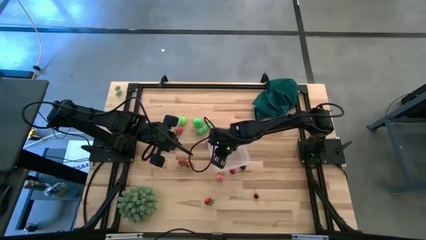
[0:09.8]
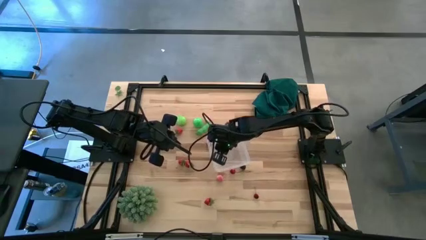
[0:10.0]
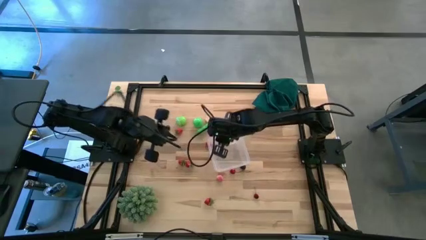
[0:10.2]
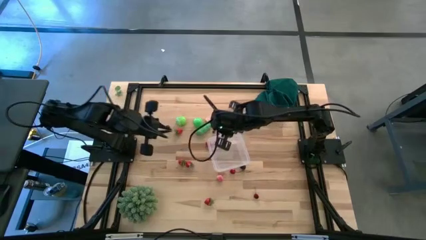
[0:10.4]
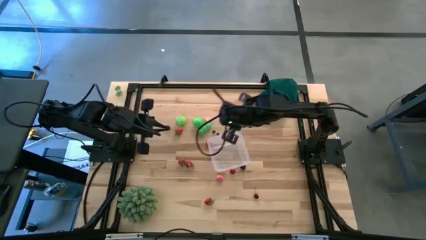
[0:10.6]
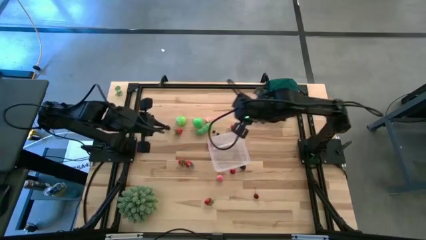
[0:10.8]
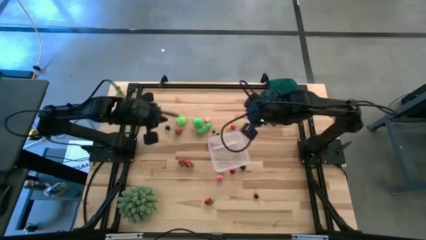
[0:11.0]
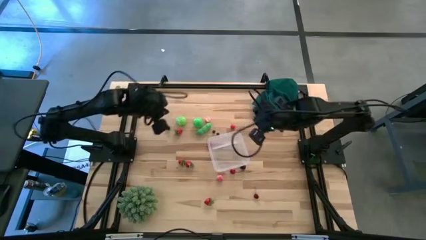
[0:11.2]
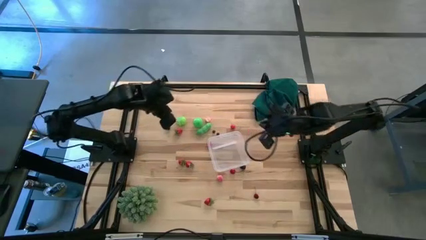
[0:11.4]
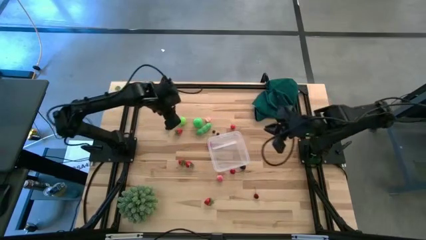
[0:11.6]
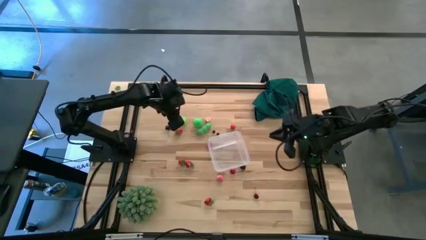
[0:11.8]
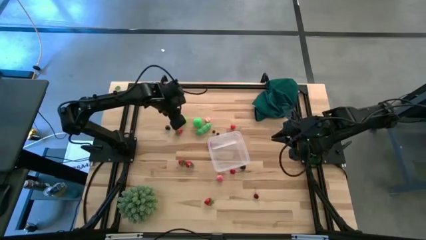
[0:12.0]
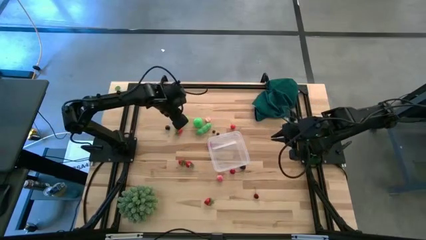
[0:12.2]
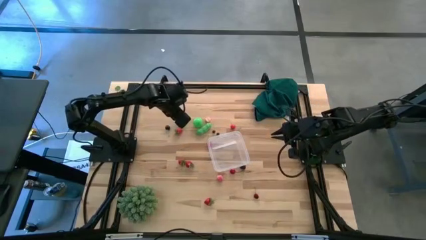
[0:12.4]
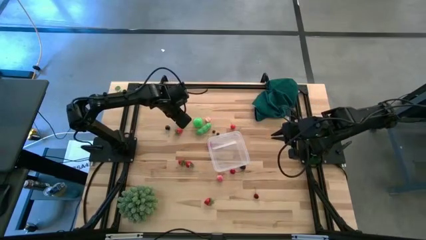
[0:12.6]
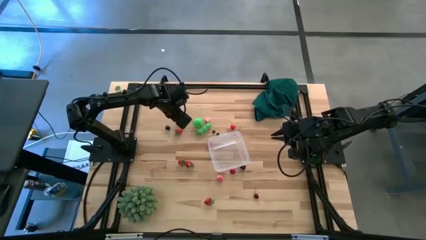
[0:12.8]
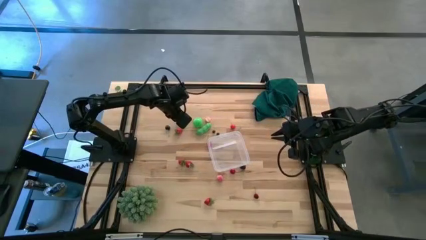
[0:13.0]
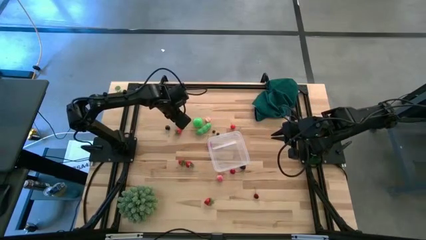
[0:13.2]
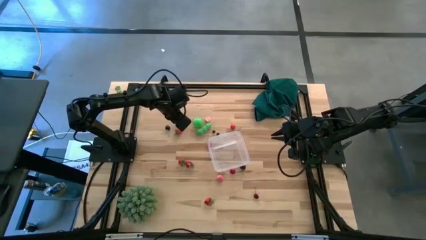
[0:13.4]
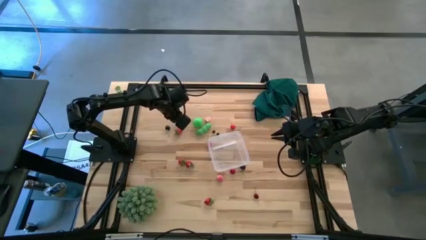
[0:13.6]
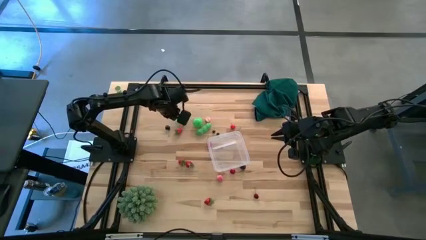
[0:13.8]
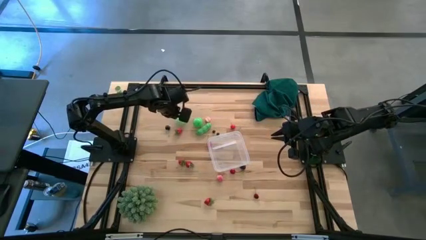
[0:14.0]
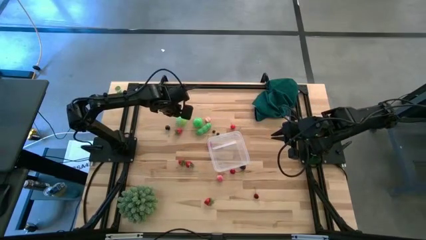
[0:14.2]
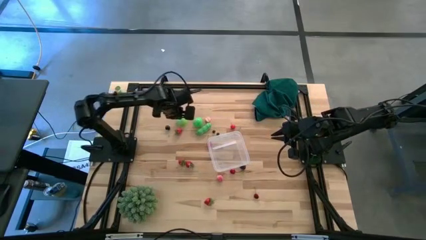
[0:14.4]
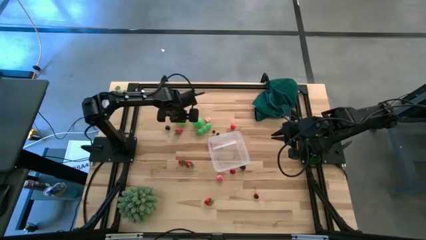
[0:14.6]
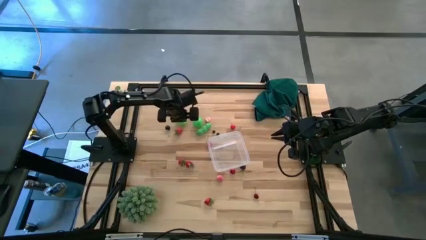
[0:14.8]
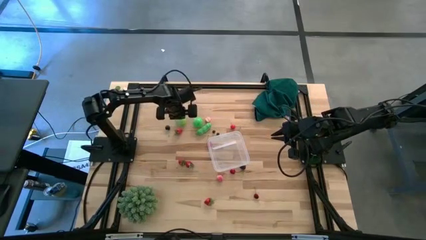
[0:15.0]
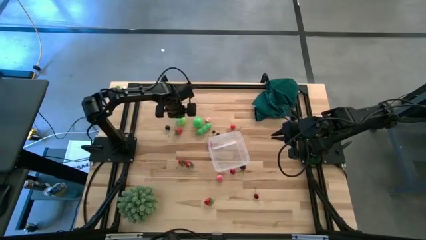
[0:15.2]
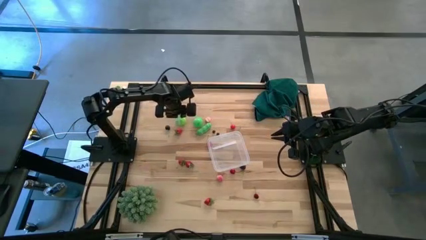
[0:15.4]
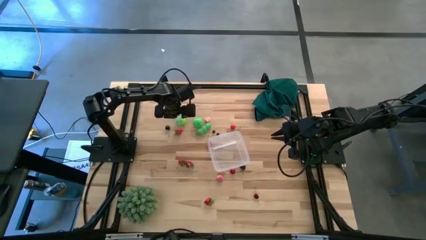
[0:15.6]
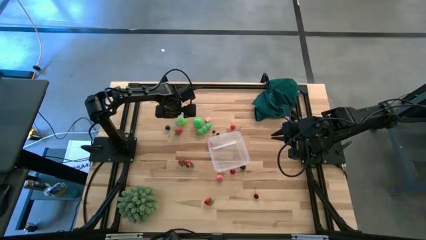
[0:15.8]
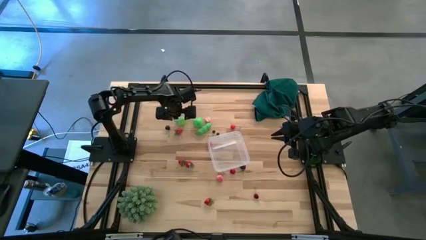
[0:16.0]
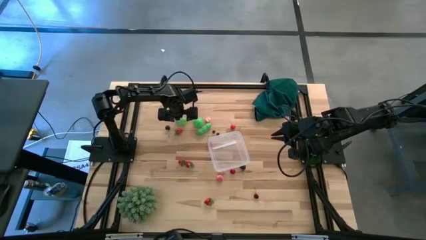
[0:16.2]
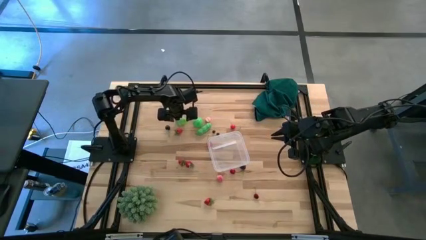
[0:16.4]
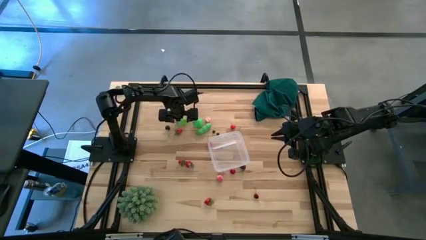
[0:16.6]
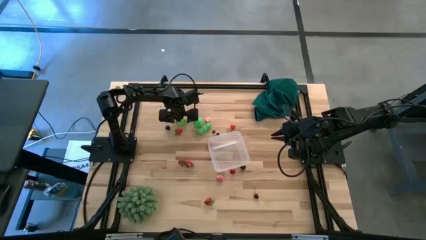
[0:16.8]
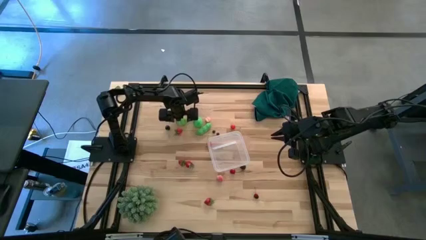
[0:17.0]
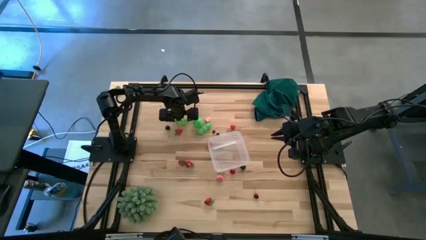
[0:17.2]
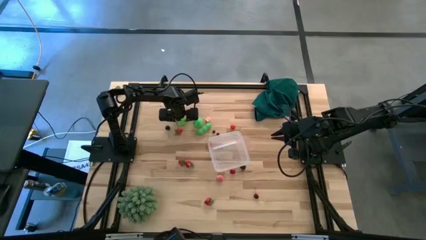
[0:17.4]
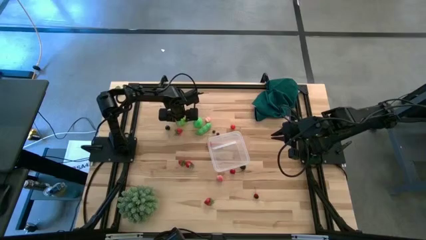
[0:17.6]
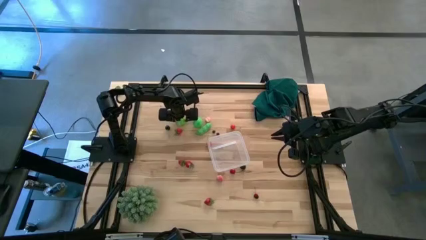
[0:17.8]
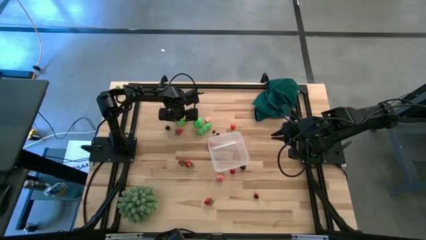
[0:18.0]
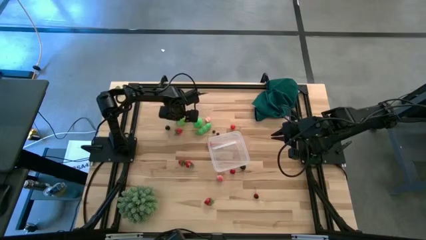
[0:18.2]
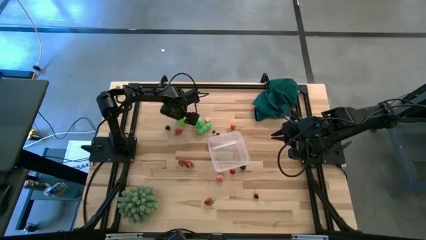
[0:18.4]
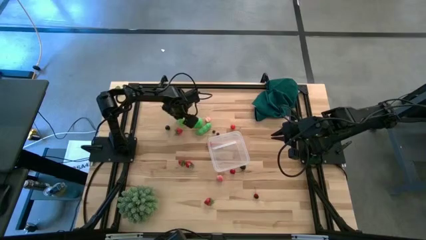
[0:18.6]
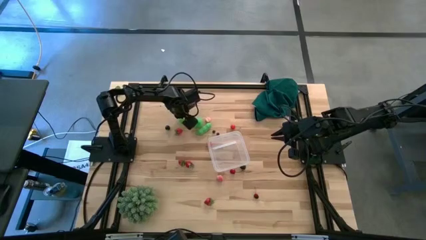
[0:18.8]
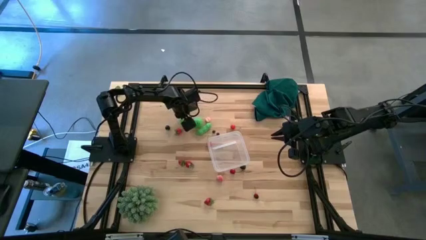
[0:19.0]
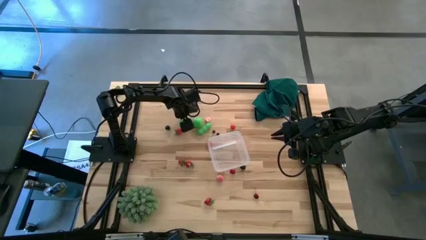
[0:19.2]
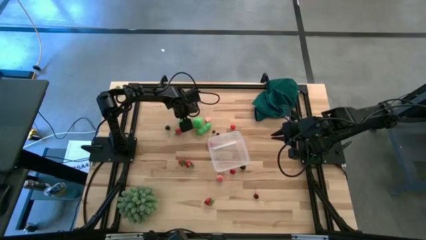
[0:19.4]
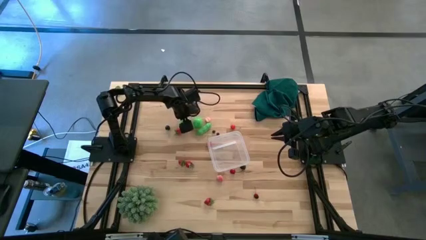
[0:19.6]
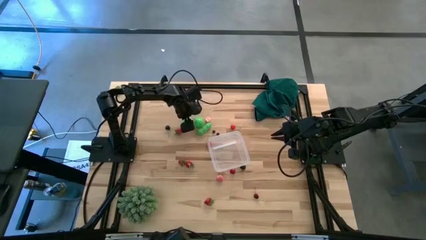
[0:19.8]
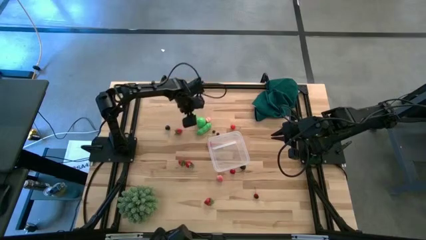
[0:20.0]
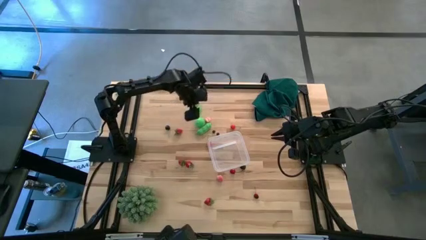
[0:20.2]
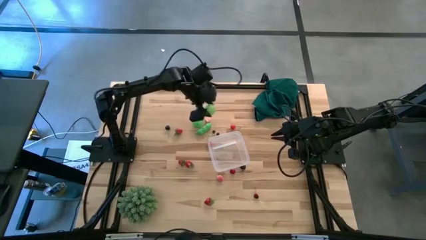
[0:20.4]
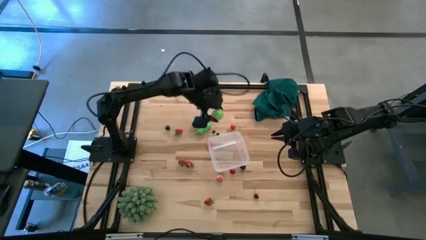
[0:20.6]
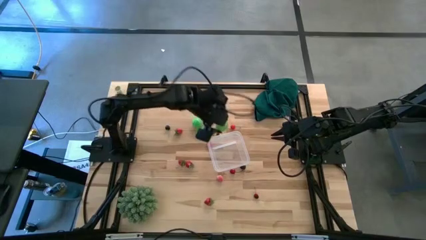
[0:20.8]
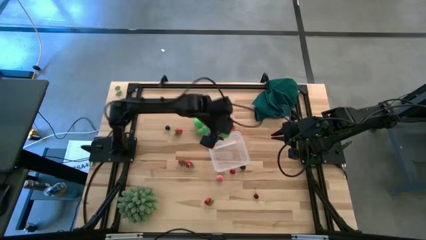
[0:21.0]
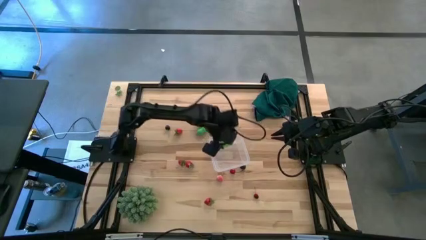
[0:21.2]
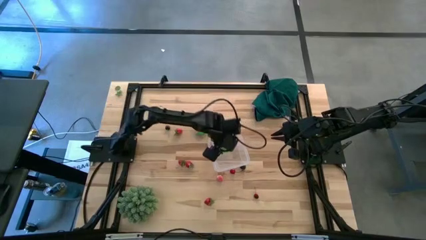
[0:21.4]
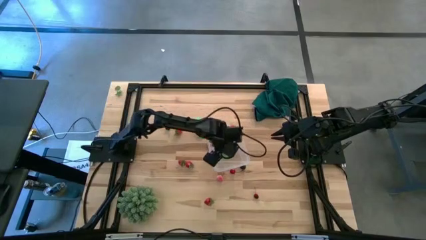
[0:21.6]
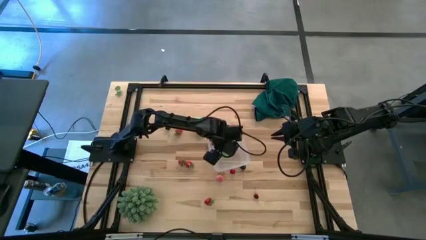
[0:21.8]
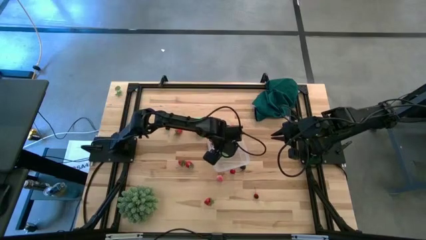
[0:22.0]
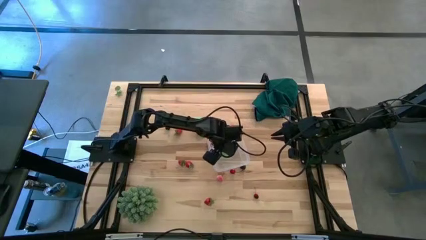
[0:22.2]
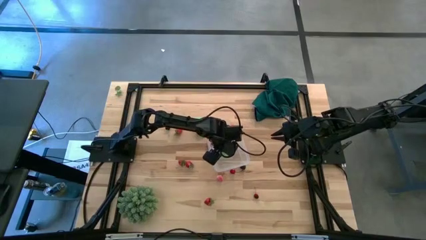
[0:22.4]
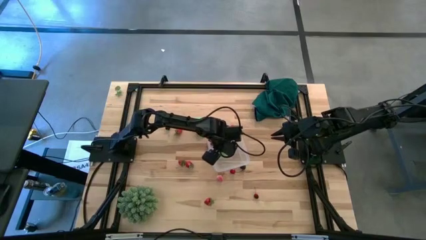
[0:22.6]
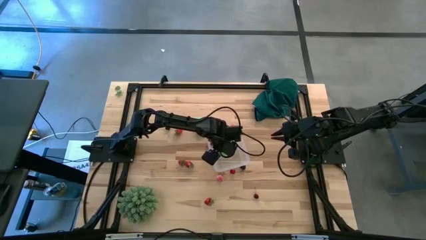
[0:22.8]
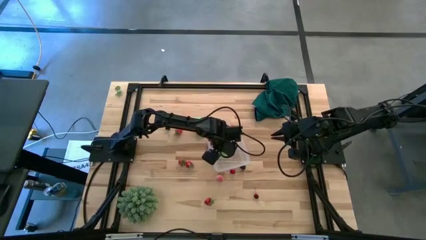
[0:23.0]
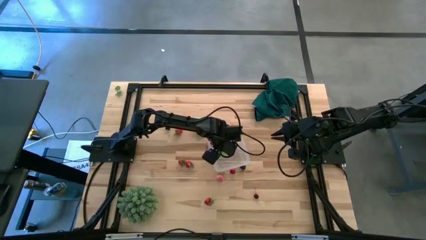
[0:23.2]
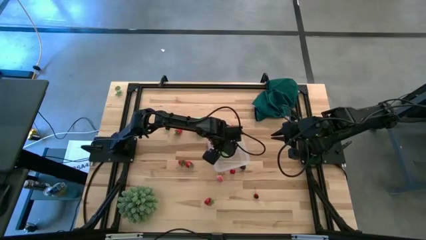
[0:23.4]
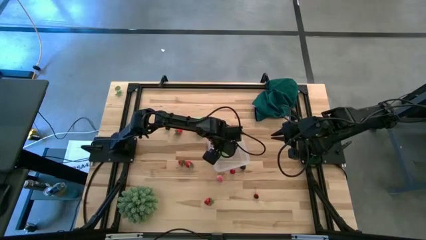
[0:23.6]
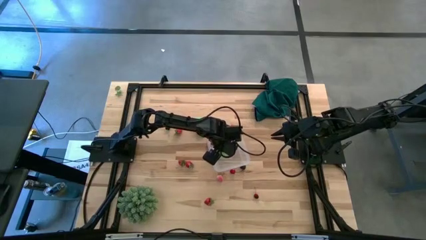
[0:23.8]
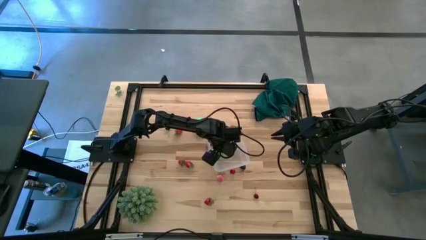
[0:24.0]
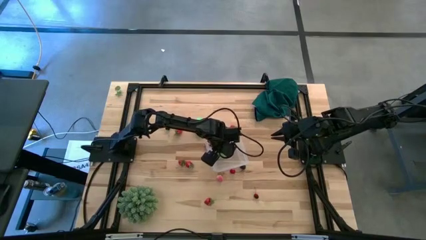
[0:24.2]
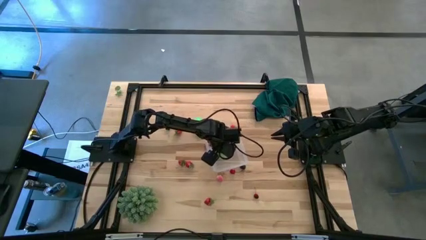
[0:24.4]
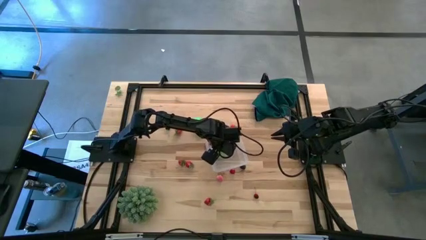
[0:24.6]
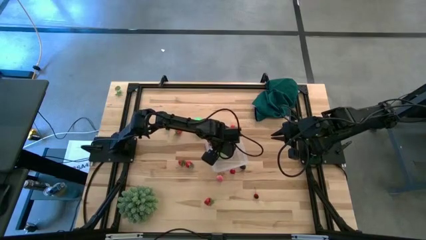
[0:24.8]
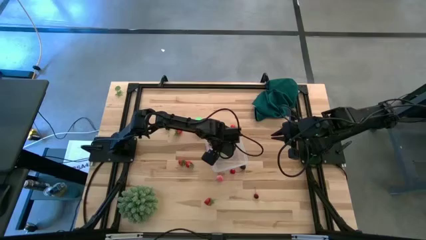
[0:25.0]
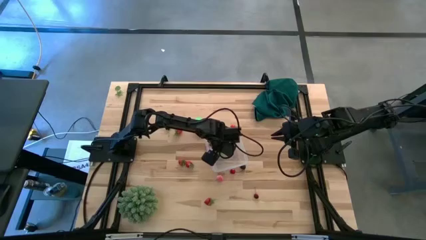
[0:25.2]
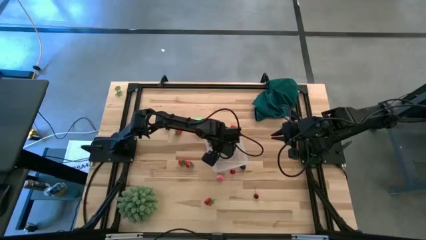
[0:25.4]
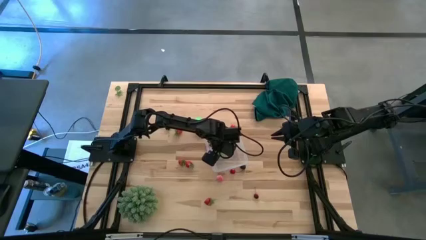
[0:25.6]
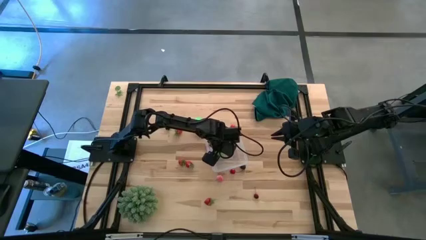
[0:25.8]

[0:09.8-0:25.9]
Task: Pick and placing Produce into tupperware
Put the green cabbage into the transparent container
